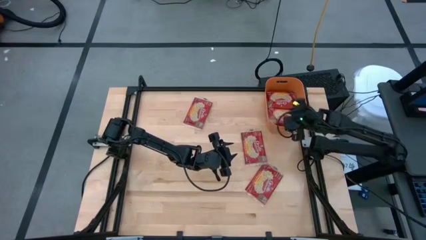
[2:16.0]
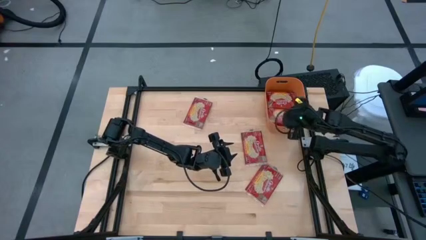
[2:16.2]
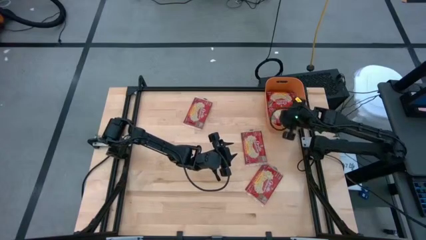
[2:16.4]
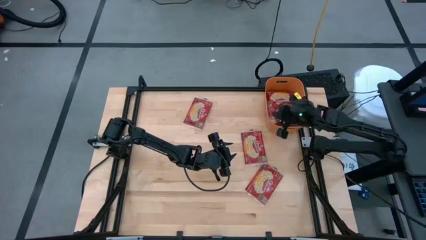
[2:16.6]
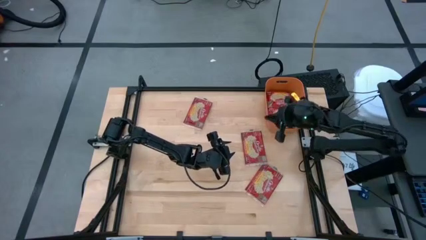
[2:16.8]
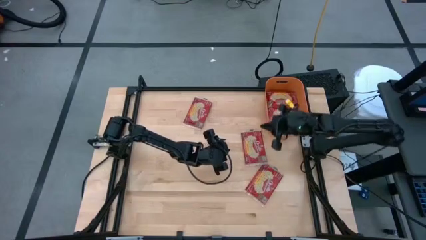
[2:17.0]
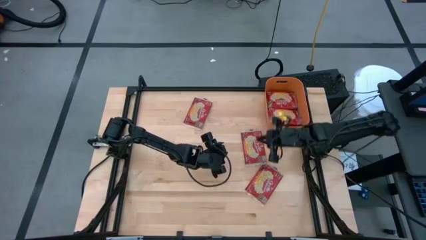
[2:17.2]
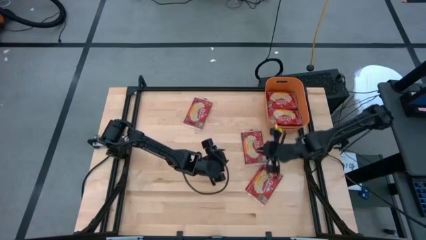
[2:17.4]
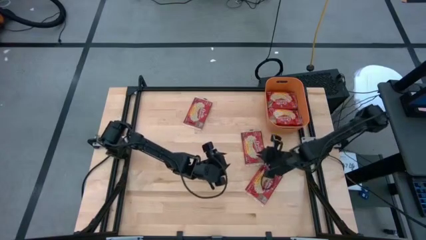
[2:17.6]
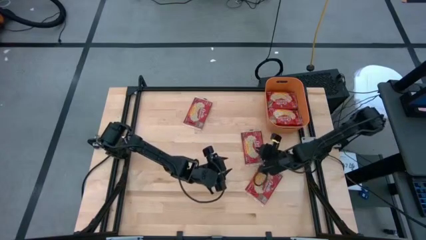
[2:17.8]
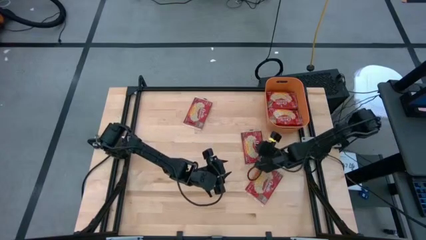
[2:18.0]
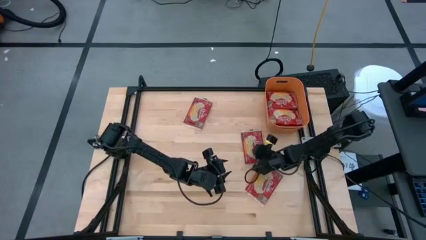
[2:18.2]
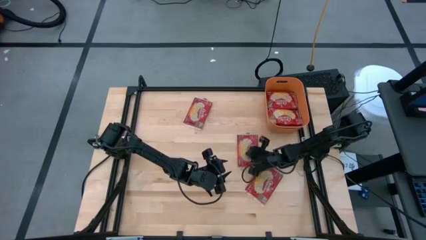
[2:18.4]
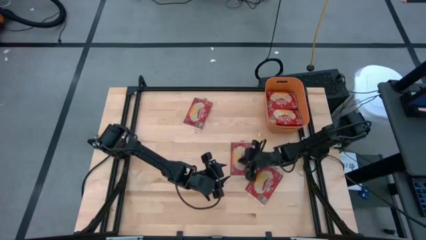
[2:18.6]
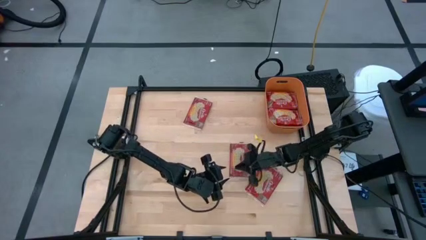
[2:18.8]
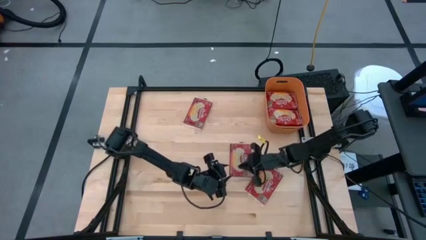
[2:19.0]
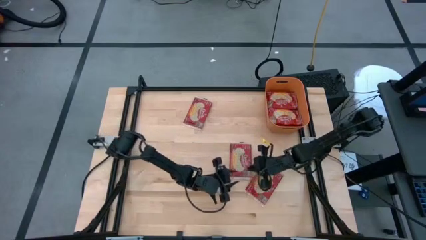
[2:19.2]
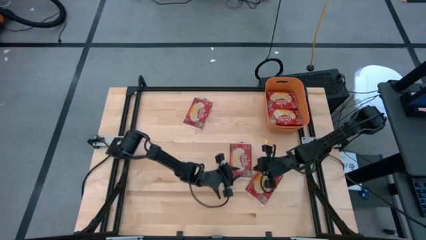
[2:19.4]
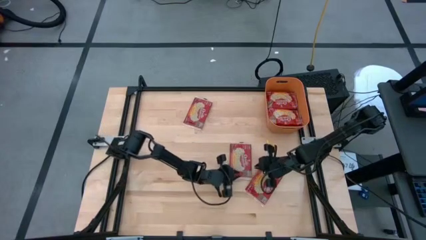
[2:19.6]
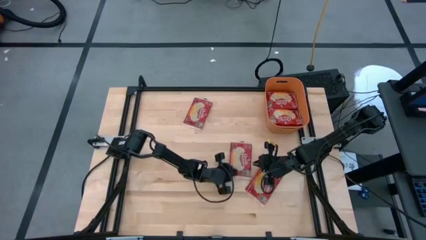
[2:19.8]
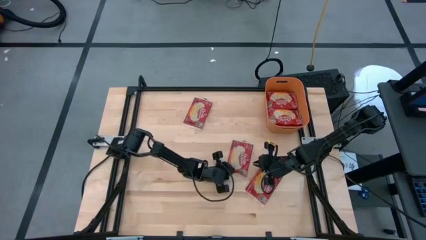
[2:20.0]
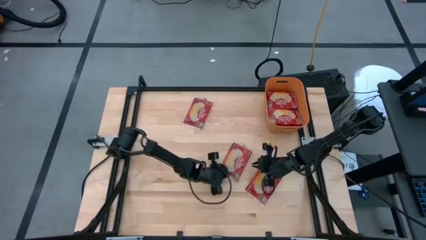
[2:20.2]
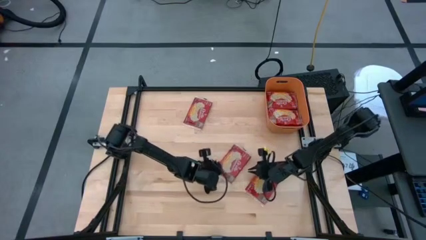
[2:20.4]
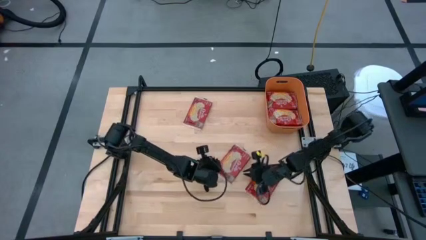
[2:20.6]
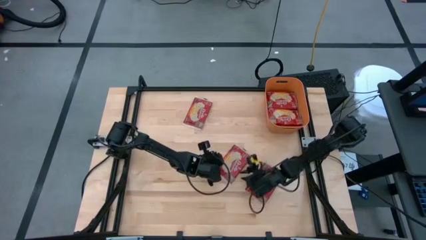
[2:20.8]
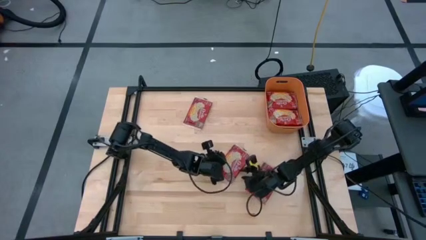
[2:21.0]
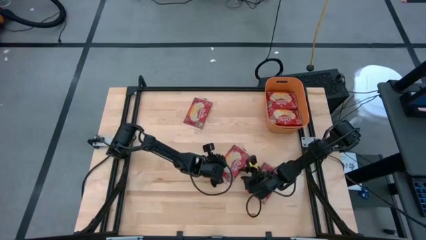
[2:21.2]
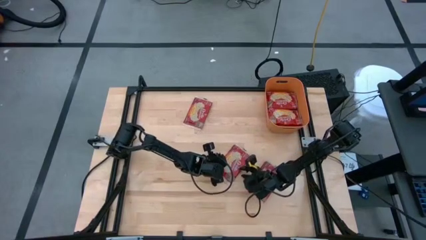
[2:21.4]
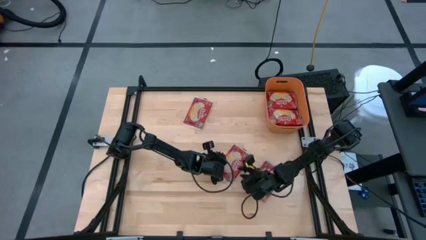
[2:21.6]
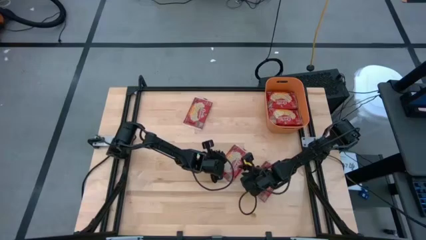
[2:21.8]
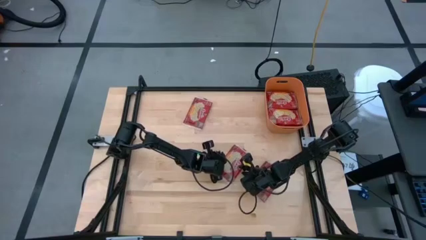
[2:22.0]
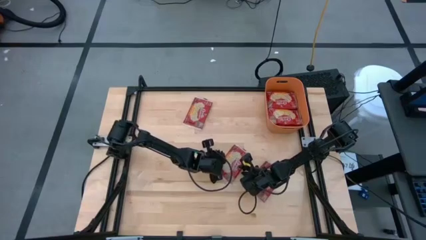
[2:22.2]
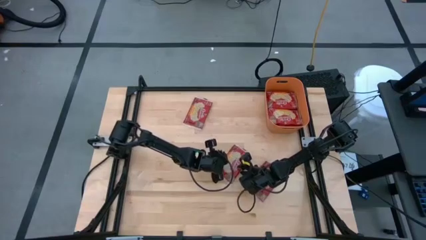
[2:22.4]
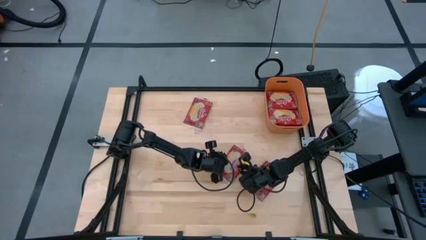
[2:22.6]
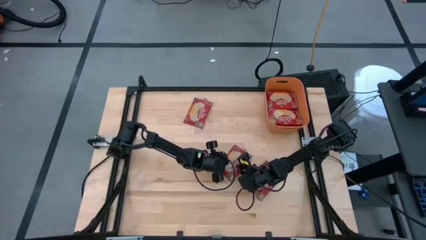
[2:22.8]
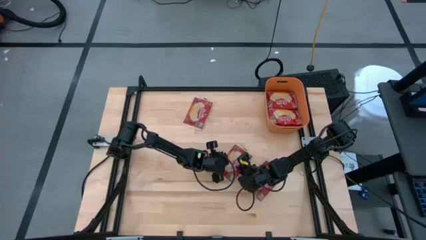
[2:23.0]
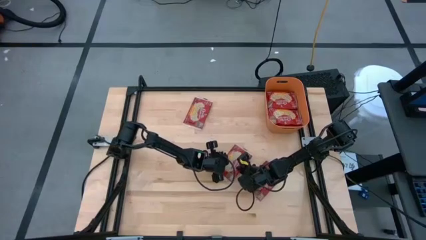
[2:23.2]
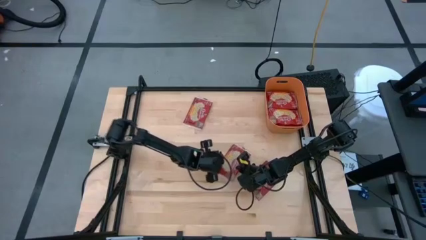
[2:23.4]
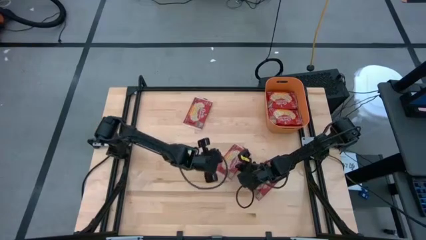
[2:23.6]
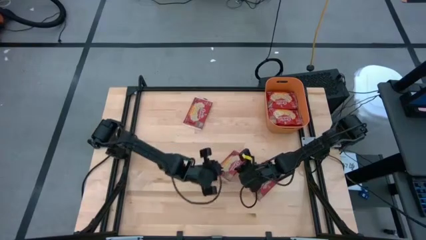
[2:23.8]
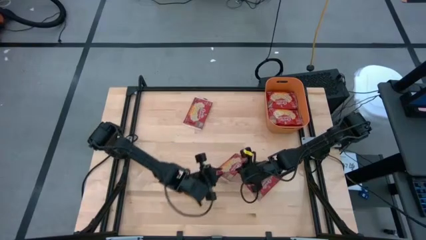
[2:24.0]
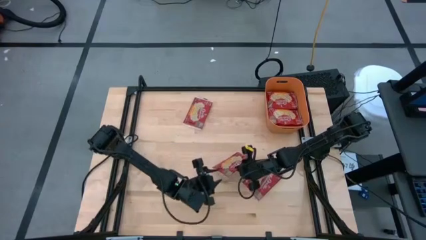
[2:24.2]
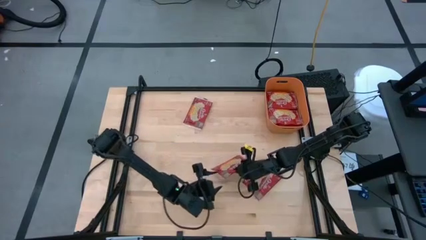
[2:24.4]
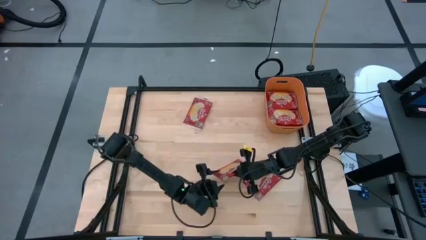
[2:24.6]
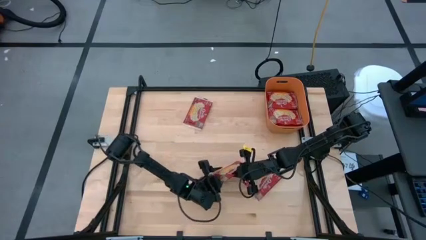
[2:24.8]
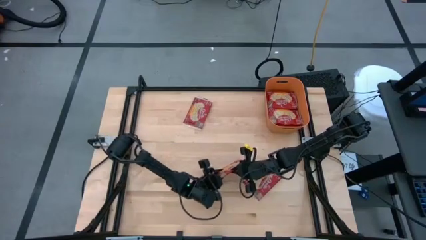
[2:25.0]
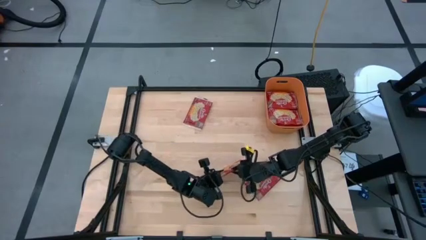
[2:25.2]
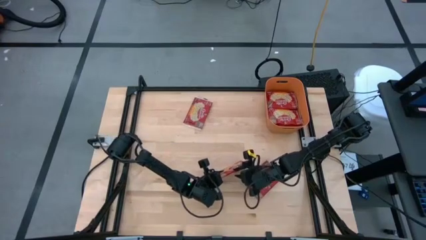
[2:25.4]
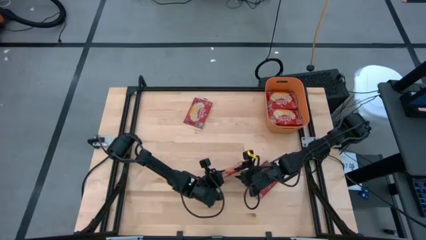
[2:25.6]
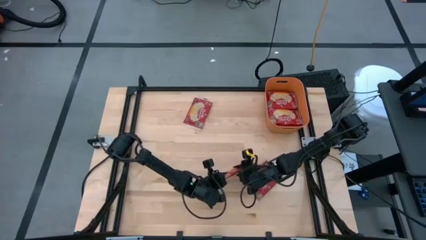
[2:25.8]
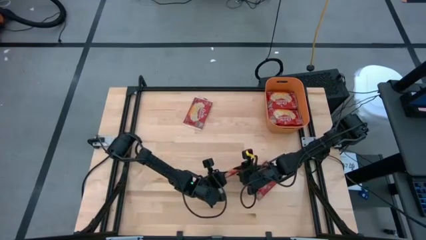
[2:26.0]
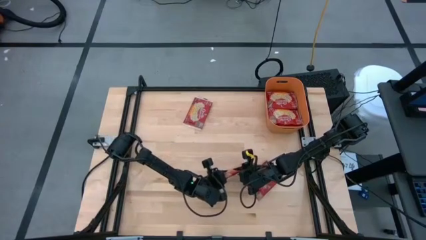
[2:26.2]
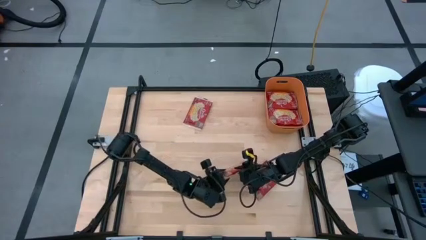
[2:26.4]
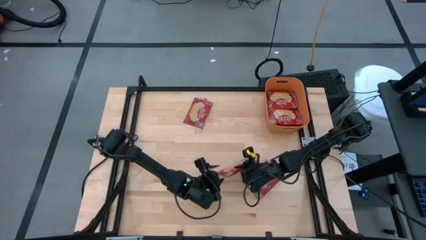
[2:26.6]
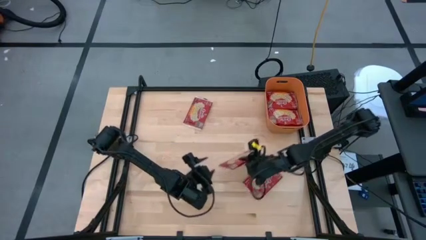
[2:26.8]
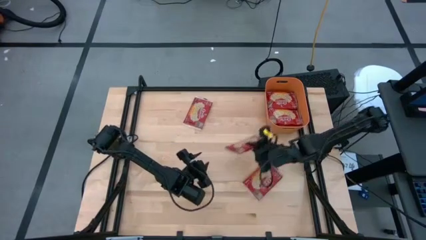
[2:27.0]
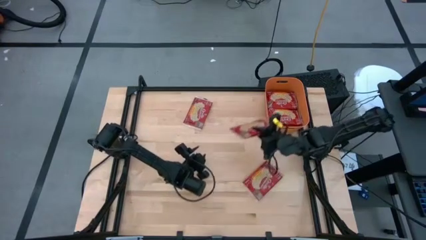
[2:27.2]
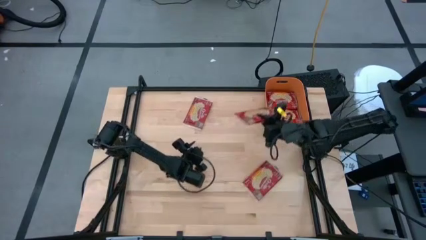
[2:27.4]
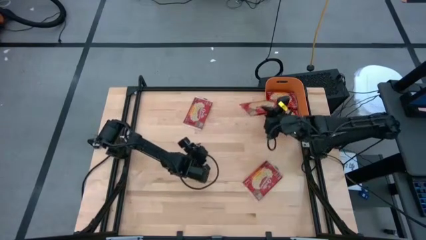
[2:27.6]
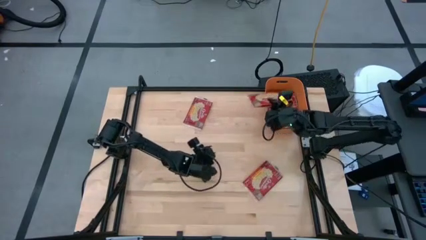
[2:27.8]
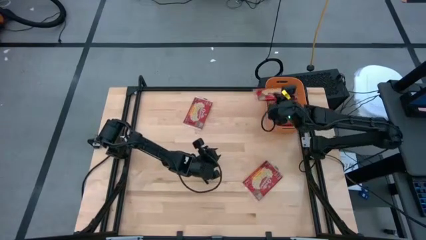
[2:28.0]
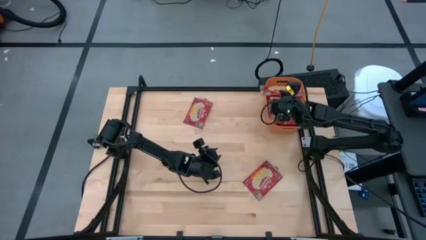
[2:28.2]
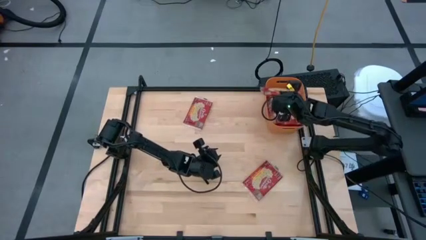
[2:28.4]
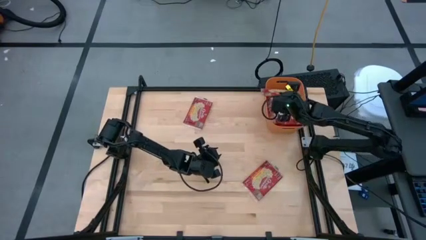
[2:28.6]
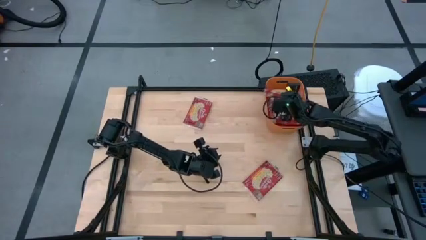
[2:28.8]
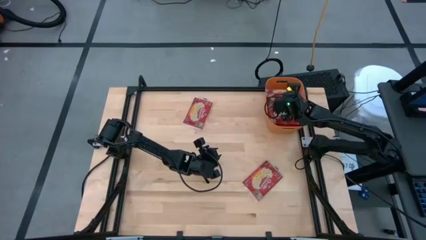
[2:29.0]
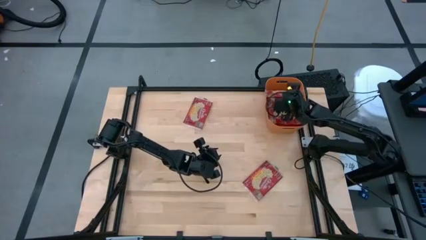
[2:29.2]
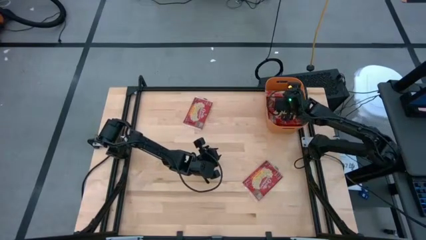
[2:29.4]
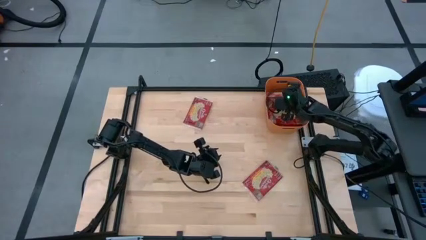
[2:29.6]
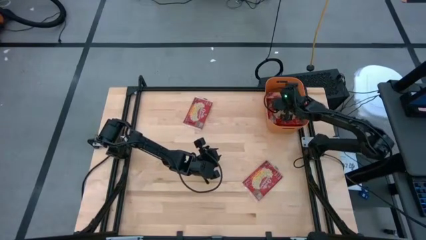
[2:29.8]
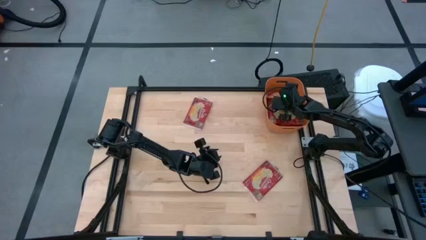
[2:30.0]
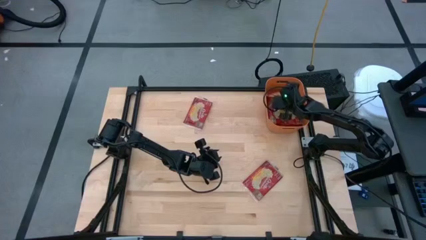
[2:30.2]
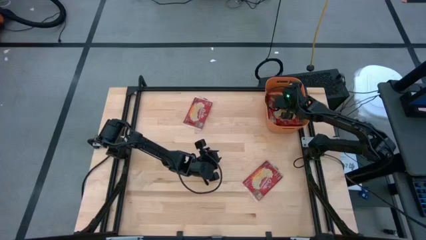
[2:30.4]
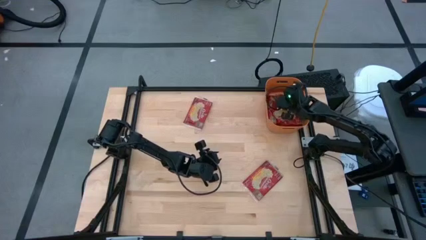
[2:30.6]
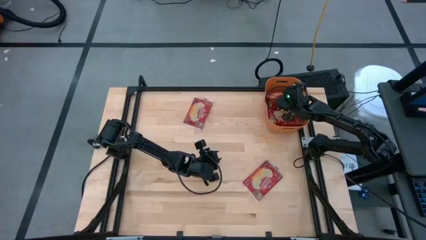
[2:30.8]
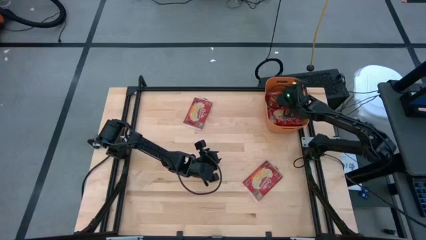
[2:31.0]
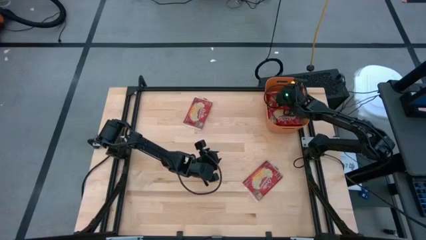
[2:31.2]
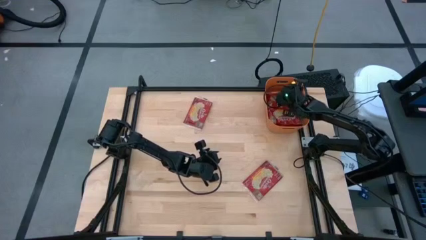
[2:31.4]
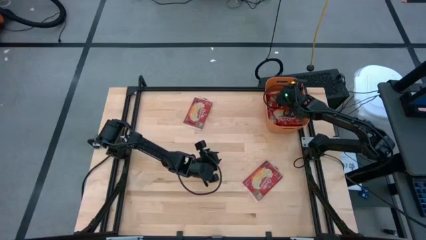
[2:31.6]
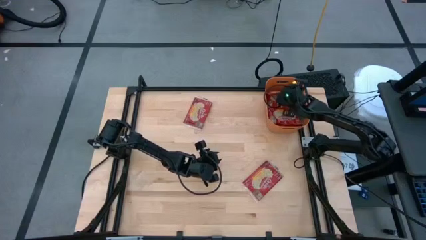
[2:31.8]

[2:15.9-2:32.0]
Task: Sort popcorn bags into baskets
Put the red popcorn bag into the orange container
